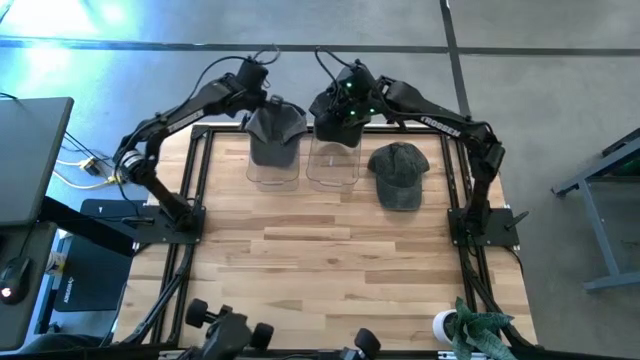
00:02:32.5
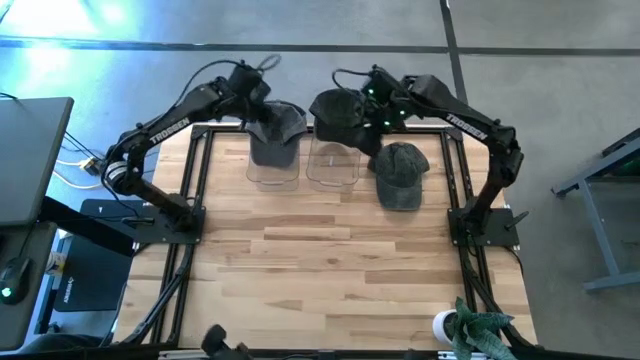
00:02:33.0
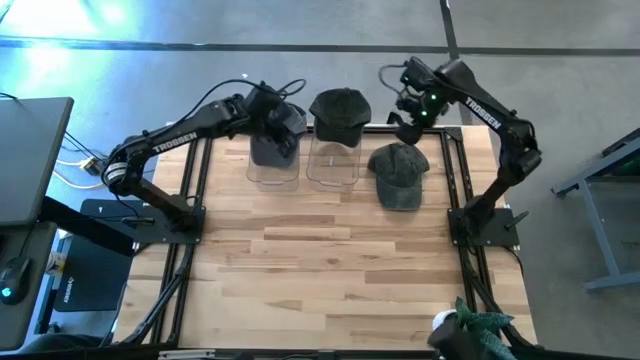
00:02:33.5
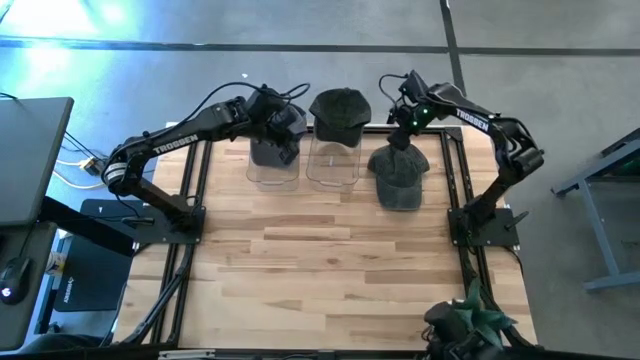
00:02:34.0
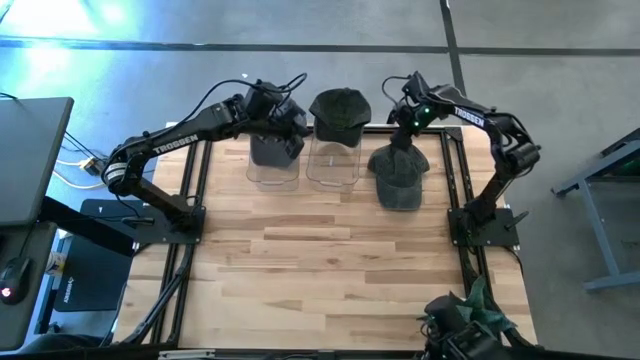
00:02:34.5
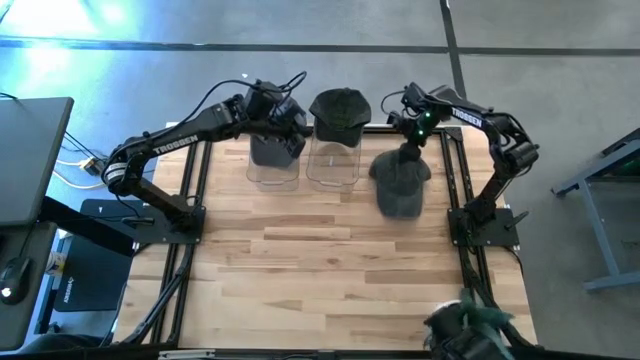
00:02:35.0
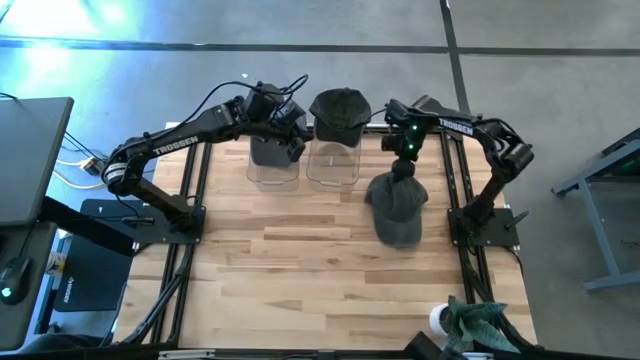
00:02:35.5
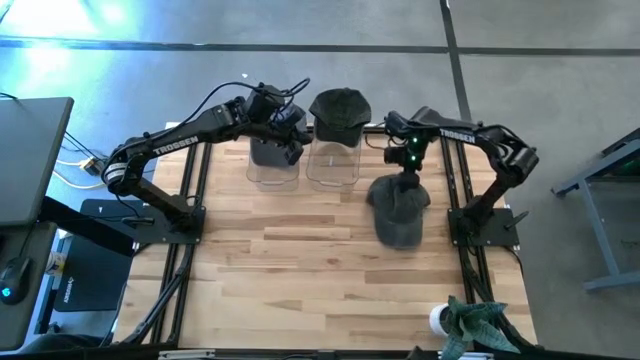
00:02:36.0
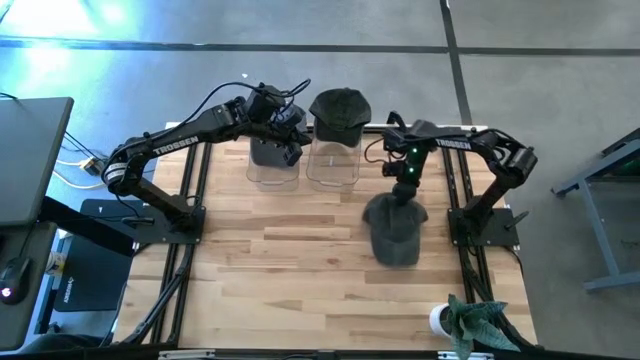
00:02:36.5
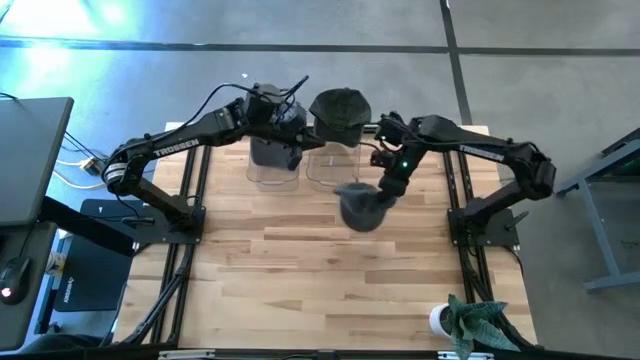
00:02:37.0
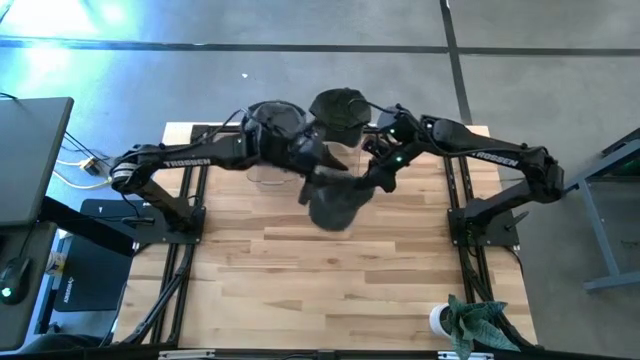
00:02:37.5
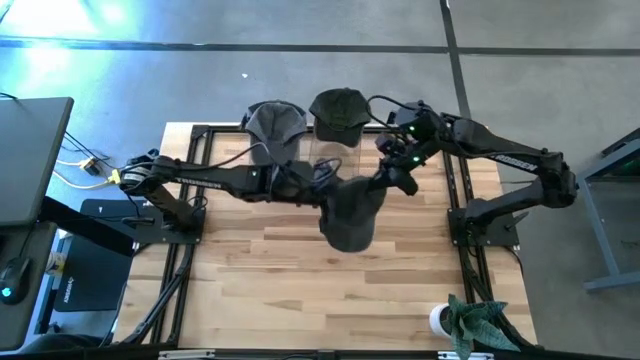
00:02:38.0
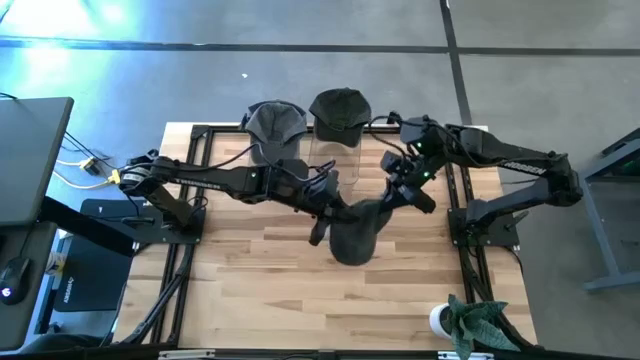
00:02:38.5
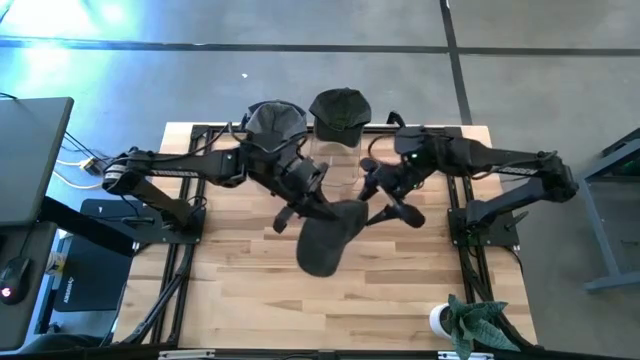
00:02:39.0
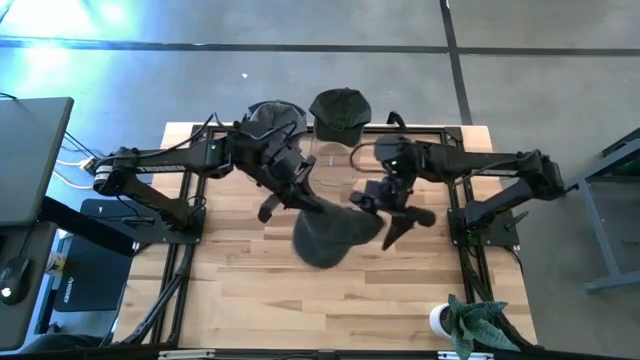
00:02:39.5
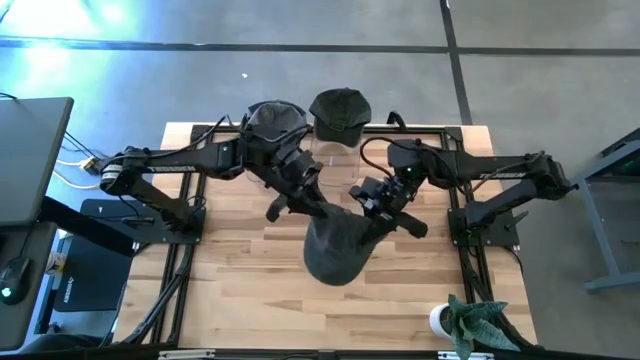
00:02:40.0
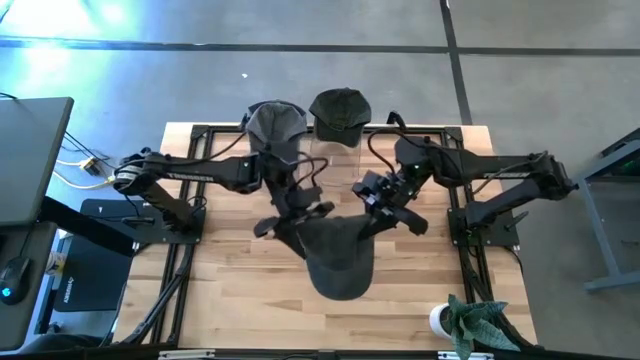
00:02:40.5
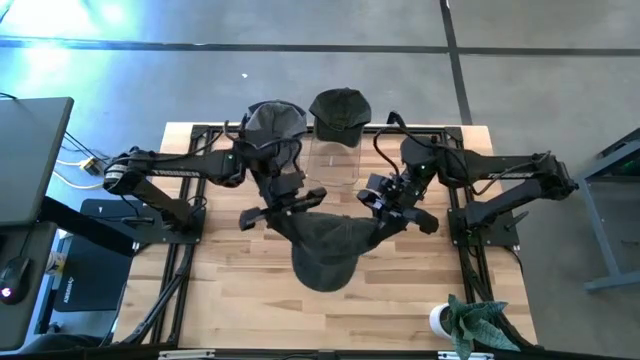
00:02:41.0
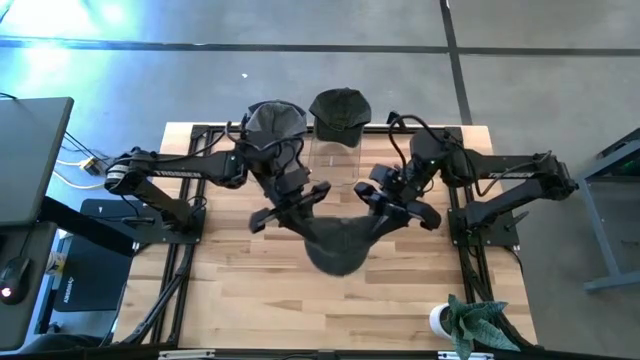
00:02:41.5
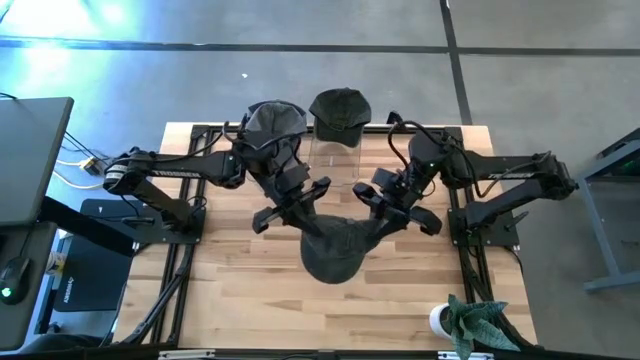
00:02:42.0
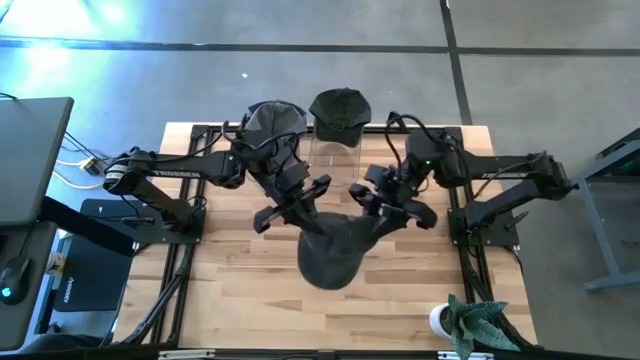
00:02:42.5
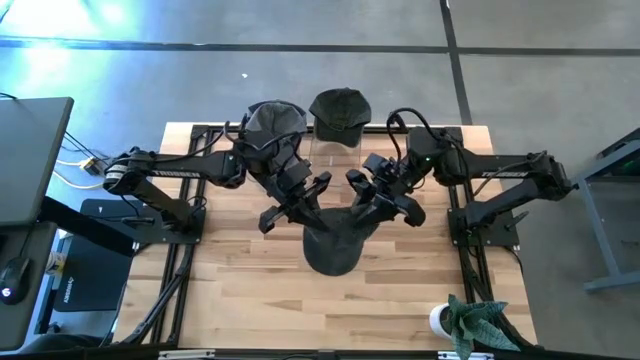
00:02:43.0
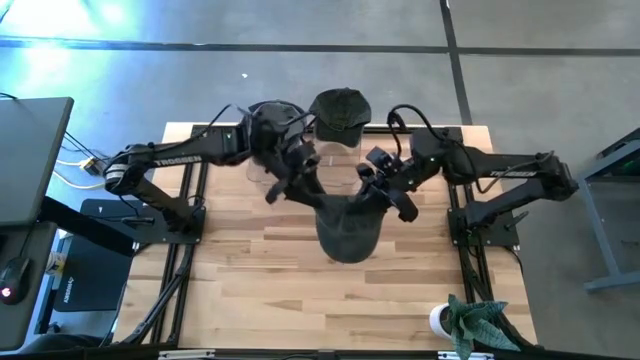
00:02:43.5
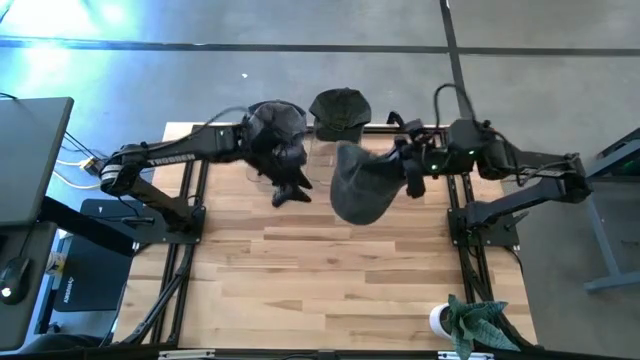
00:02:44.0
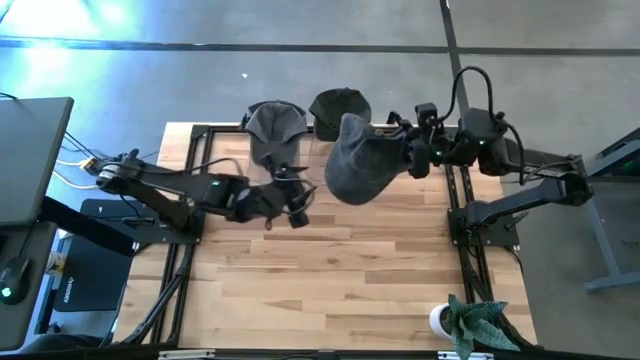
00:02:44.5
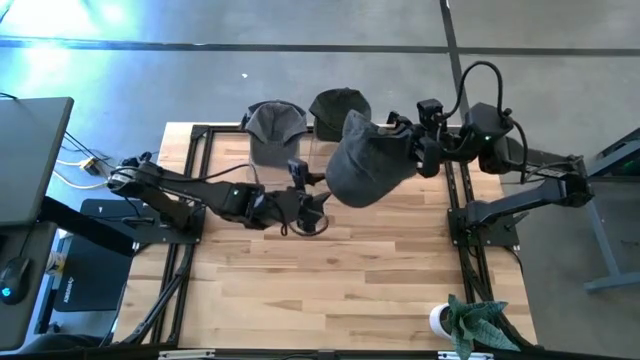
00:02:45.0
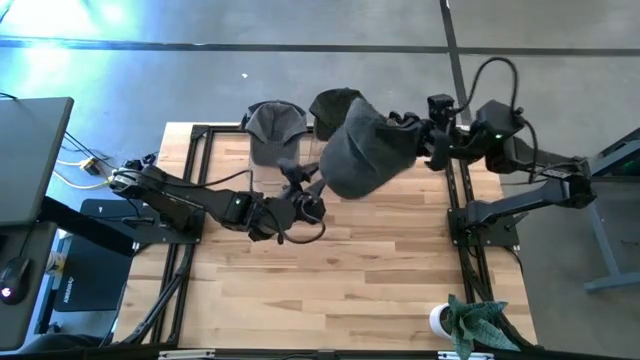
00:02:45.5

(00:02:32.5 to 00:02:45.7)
Task: Pick & Place hat
Put the black cap into the right transparent bin
